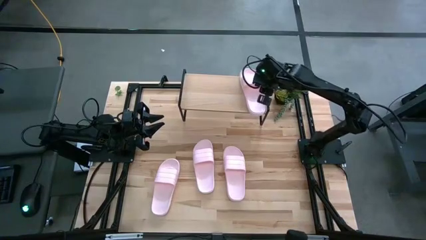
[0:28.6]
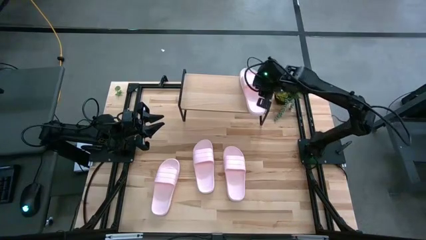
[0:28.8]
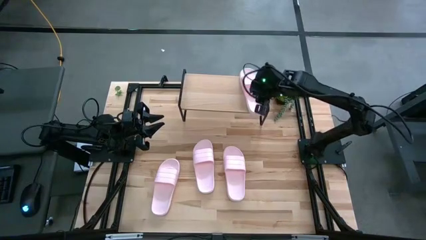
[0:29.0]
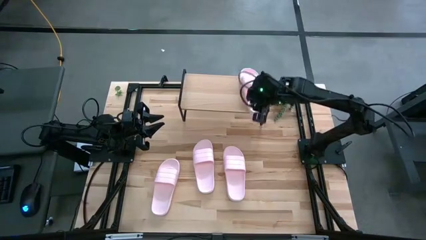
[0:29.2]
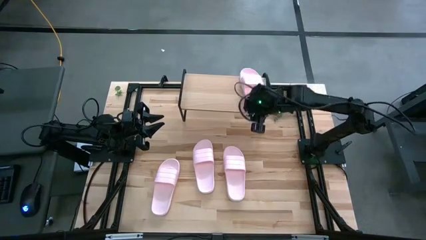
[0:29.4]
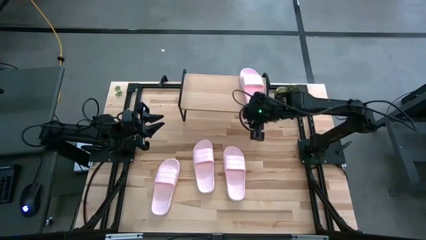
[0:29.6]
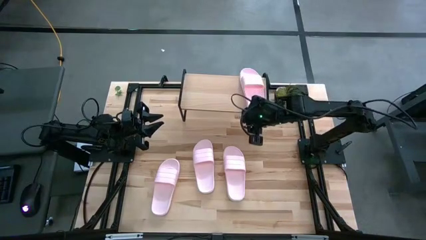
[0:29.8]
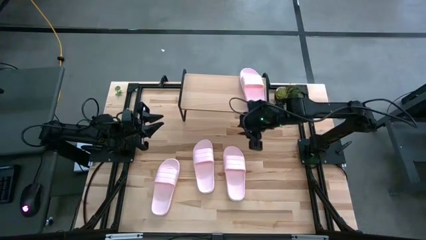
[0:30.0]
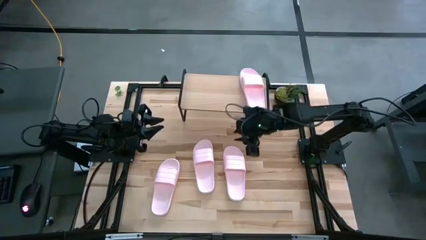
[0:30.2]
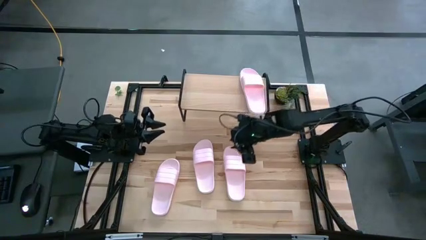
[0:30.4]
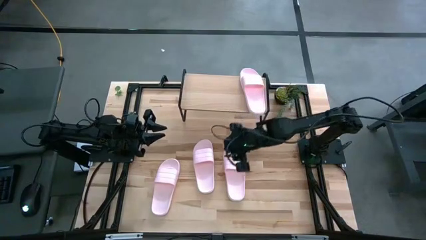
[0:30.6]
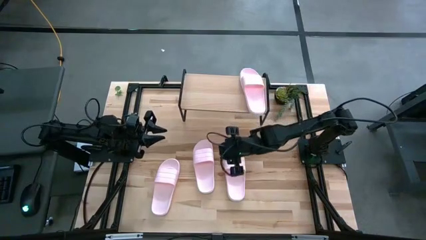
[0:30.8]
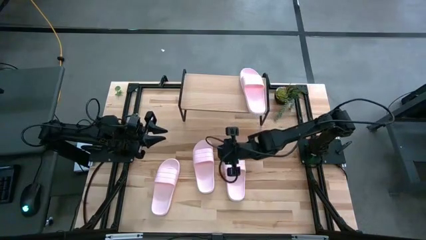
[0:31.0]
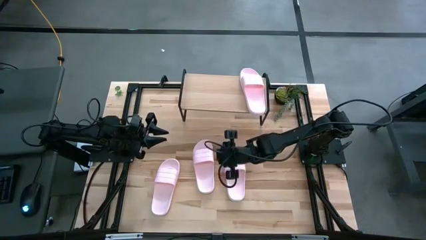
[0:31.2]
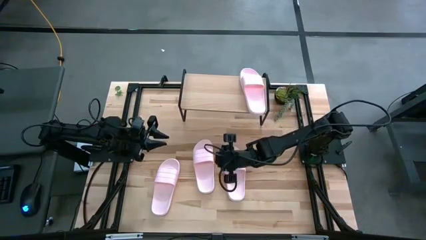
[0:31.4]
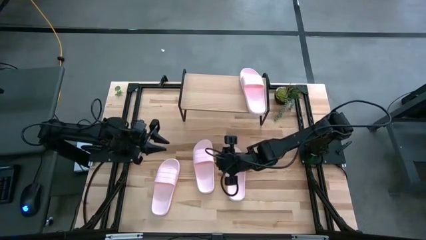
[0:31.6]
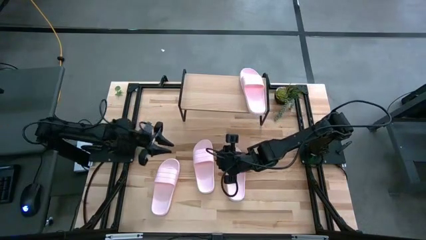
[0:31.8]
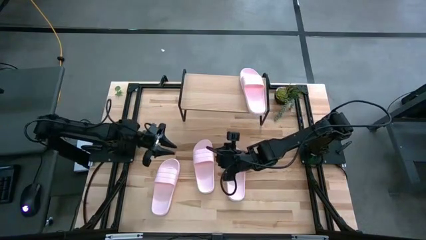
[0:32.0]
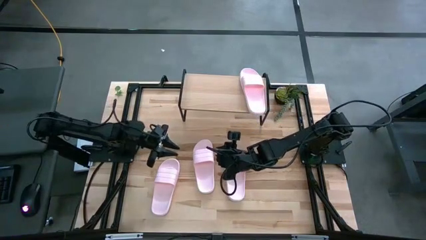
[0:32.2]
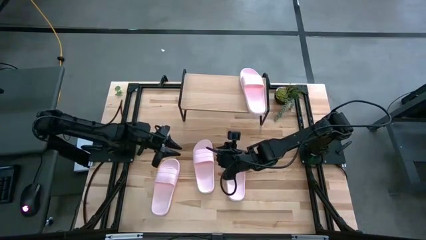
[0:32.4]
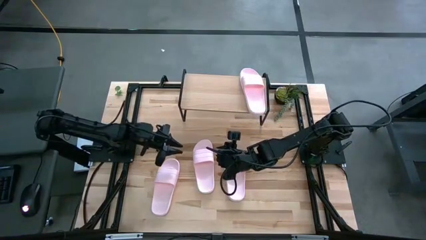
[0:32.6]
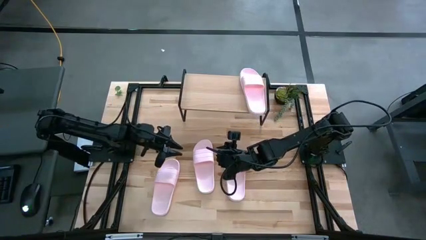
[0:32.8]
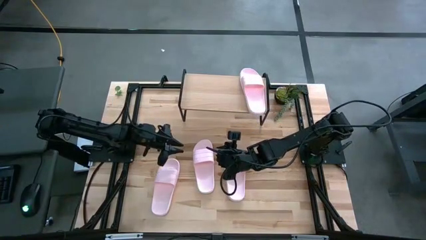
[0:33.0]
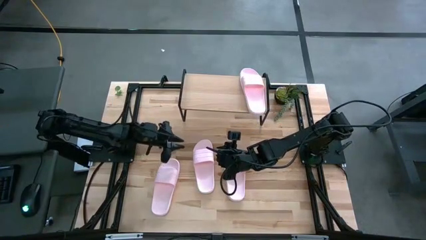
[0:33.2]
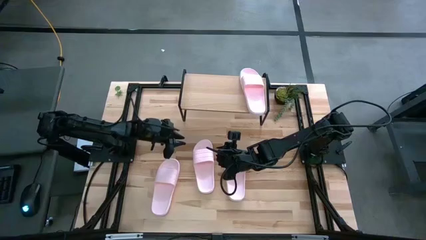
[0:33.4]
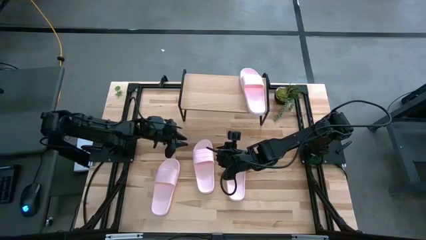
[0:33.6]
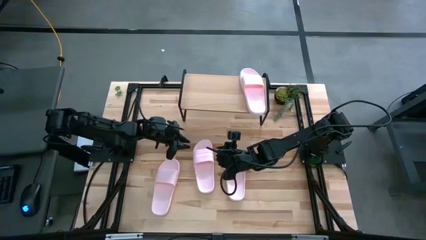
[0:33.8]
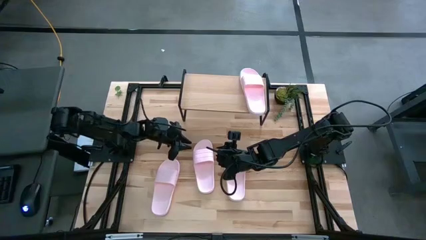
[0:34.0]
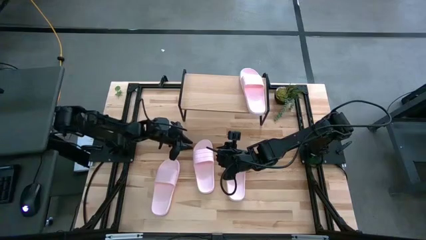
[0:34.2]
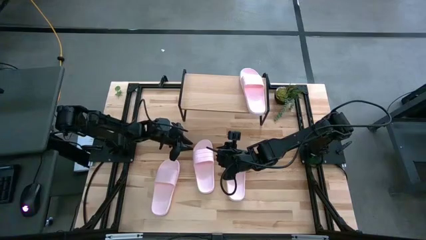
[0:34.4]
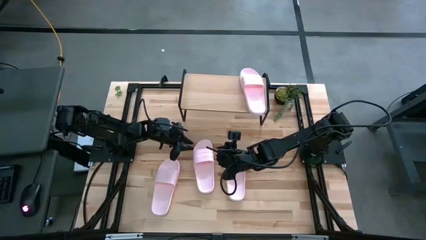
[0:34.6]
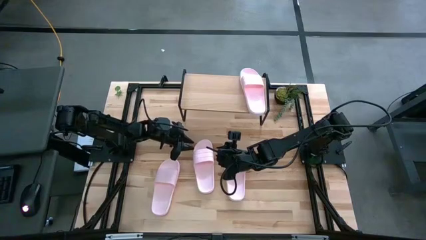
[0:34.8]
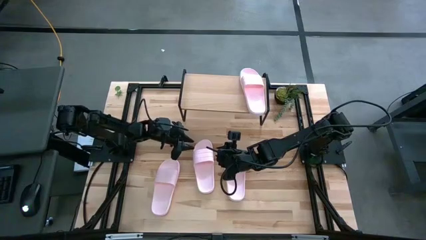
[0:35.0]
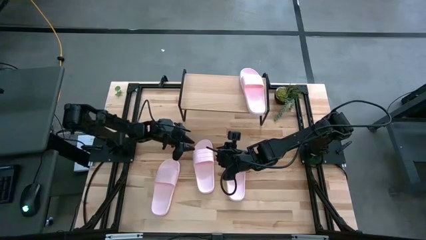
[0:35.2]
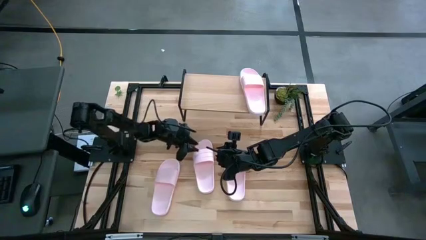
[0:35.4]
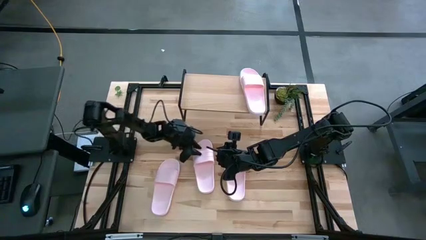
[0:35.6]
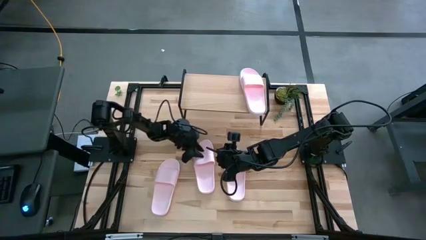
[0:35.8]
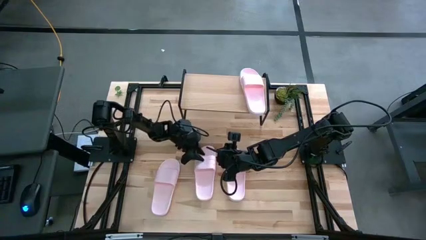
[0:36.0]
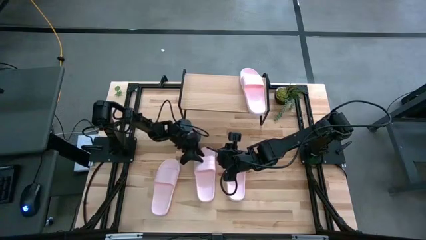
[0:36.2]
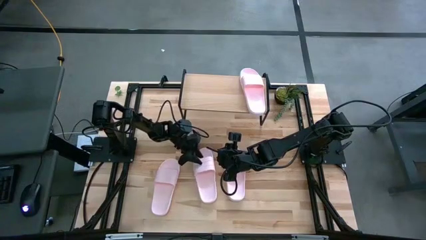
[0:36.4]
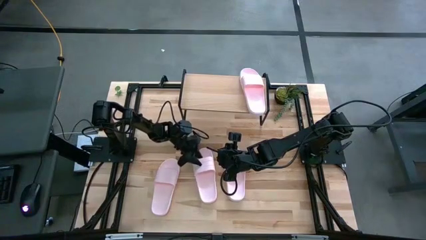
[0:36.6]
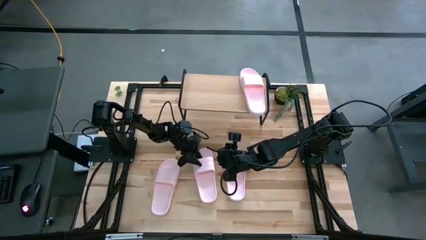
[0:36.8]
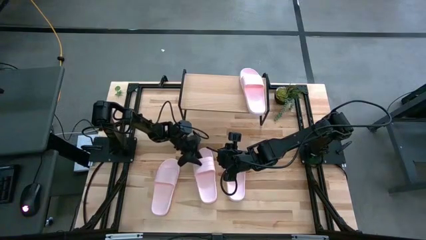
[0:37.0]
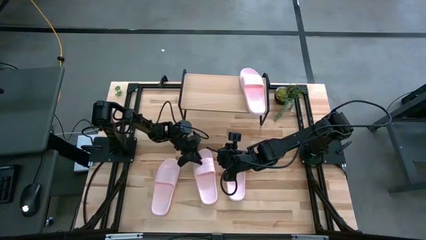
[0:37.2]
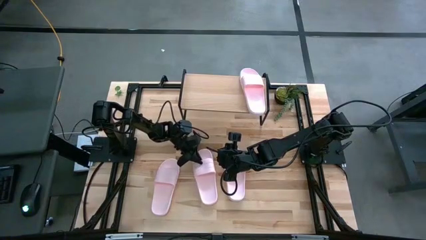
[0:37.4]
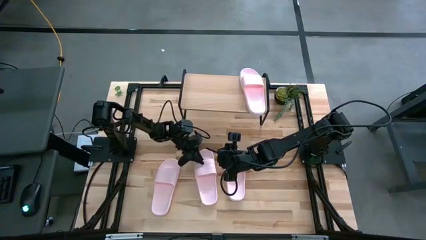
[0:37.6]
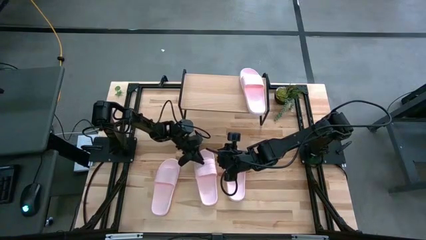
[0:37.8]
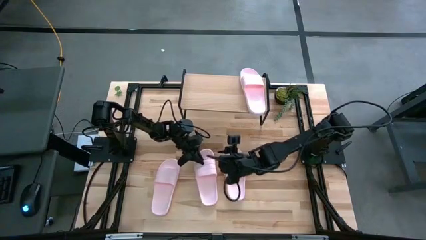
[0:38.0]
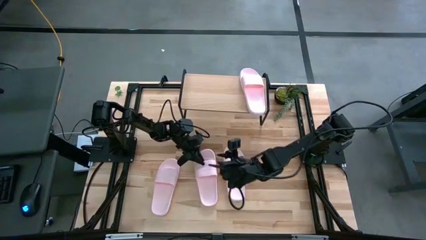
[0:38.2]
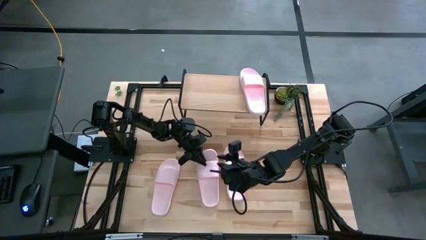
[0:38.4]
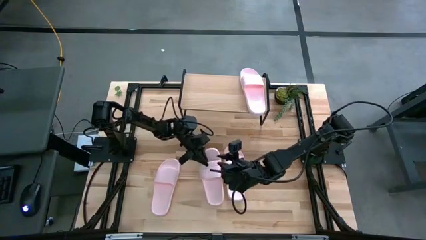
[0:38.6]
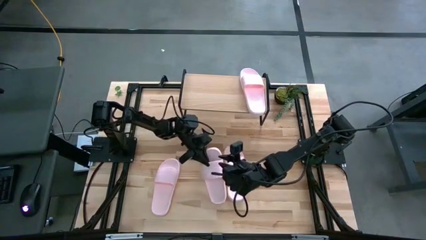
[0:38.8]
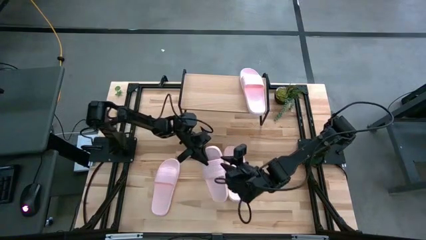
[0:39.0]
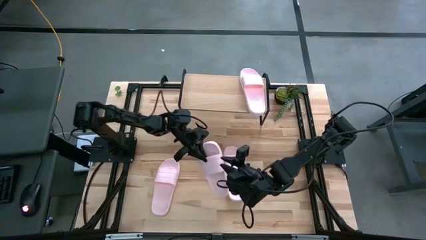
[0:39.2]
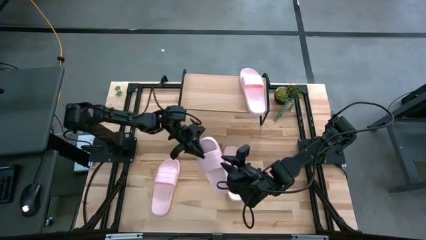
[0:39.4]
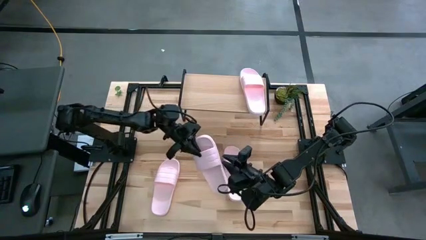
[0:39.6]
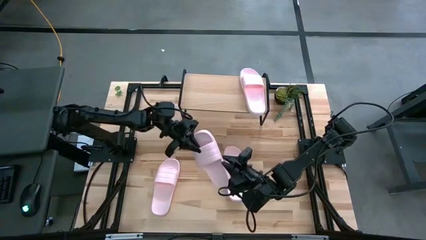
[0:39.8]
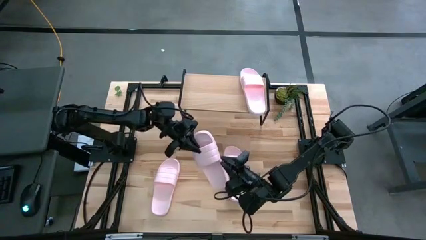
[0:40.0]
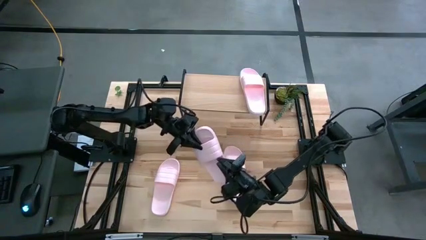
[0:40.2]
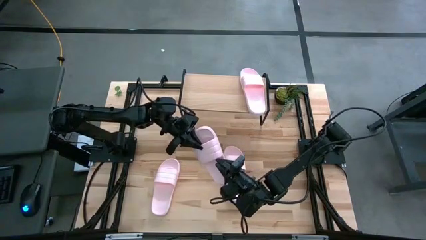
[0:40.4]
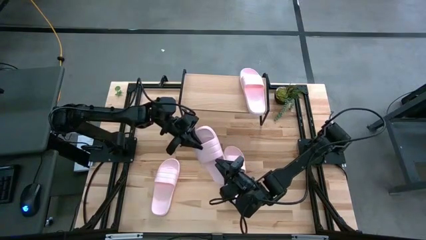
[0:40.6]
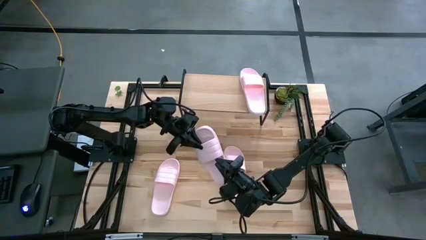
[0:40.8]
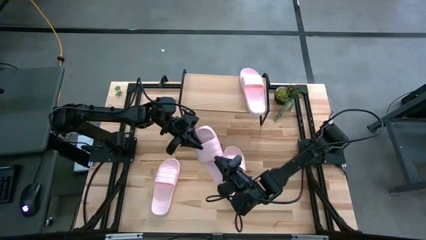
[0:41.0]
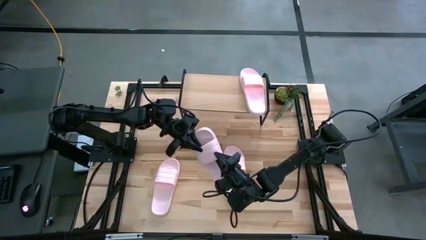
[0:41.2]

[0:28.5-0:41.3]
Task: Pick and place slides into the shelf
Put the pink slide on the shelf
